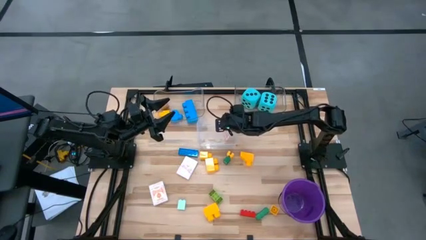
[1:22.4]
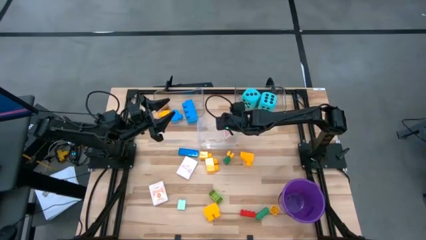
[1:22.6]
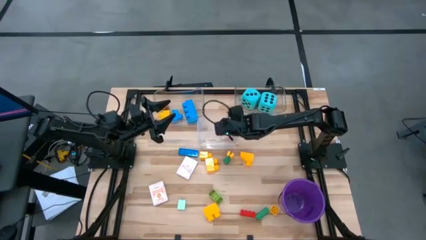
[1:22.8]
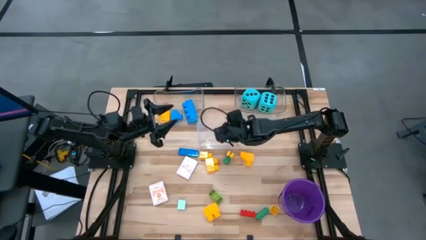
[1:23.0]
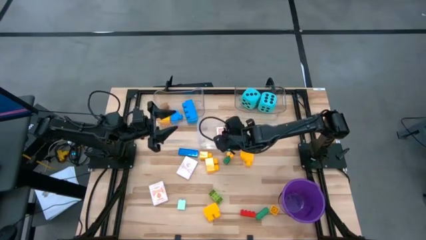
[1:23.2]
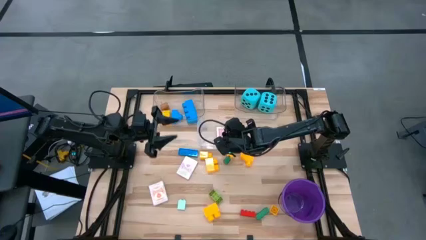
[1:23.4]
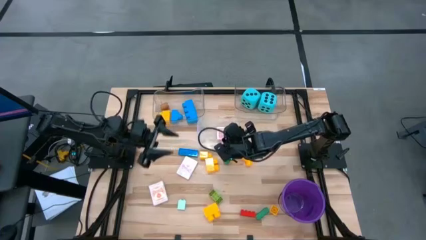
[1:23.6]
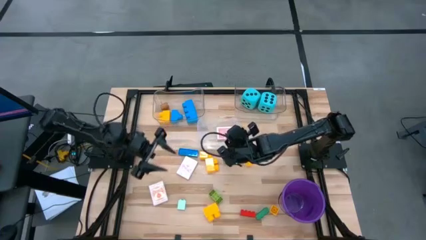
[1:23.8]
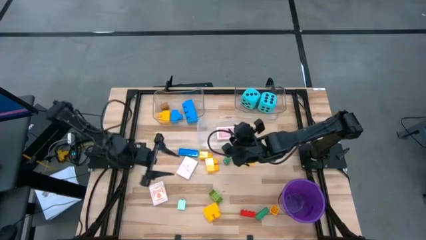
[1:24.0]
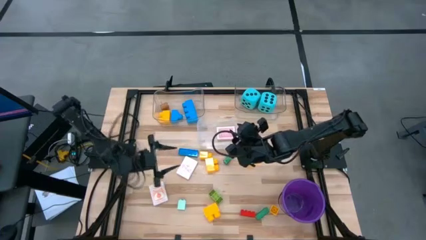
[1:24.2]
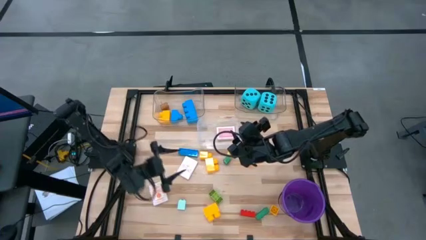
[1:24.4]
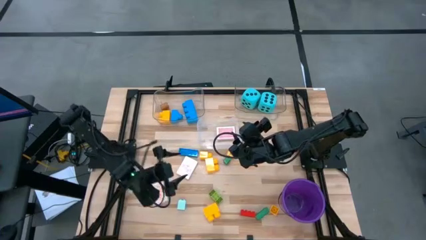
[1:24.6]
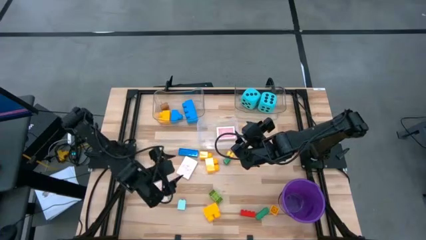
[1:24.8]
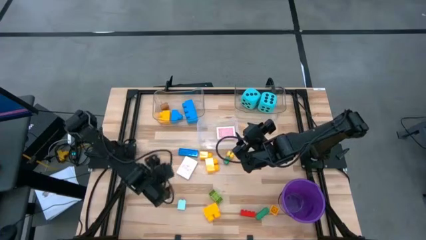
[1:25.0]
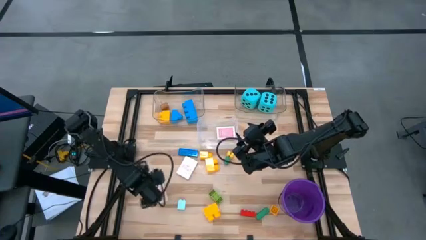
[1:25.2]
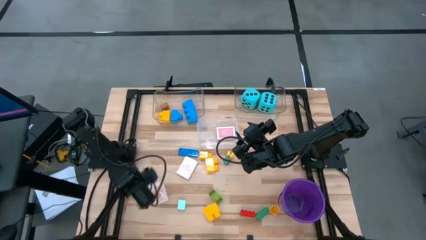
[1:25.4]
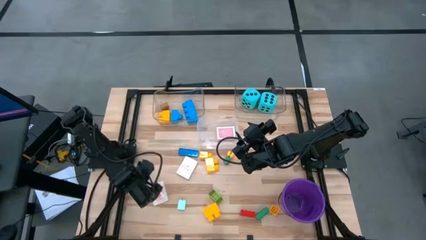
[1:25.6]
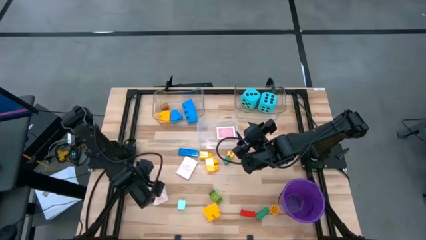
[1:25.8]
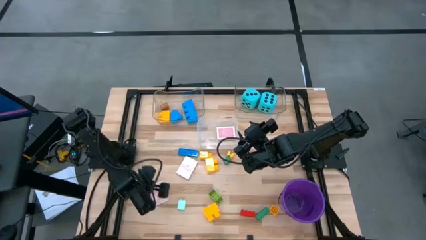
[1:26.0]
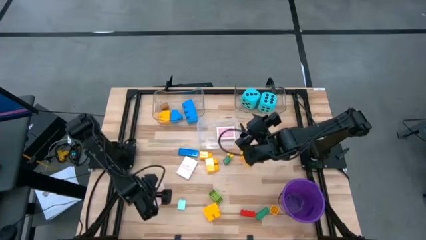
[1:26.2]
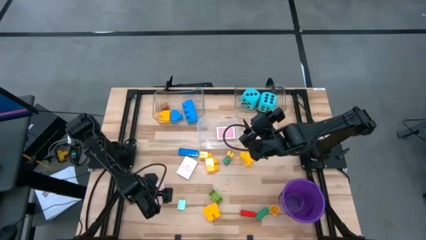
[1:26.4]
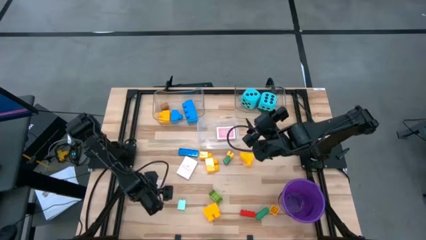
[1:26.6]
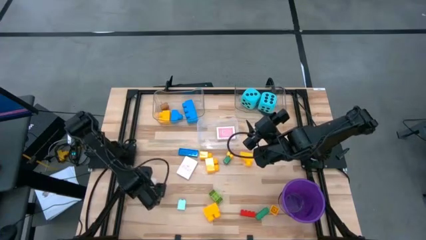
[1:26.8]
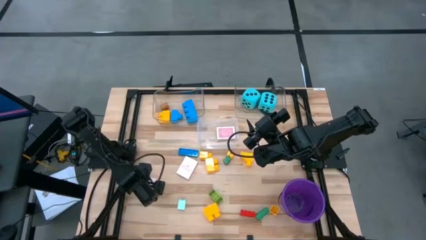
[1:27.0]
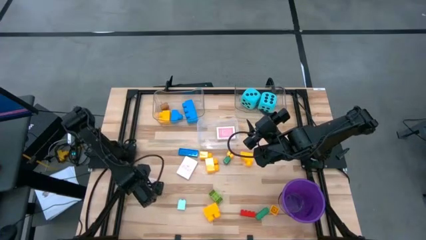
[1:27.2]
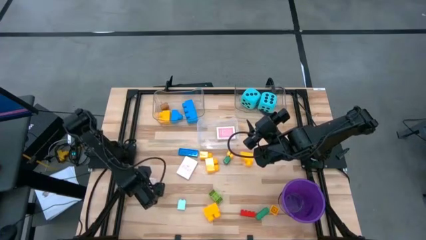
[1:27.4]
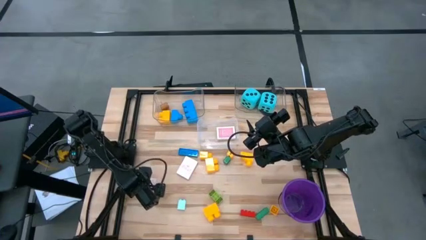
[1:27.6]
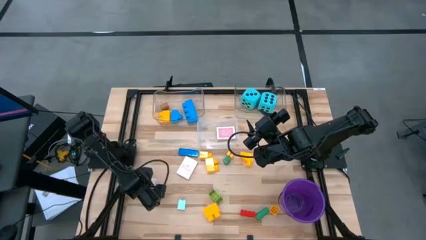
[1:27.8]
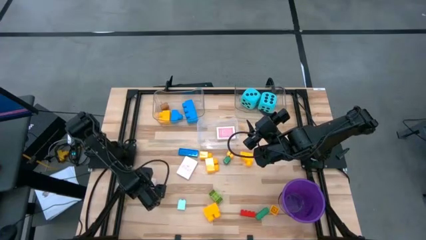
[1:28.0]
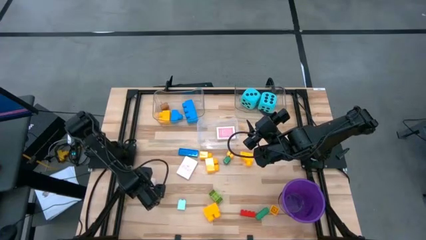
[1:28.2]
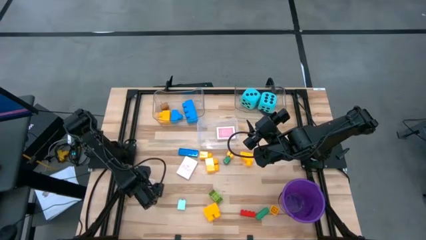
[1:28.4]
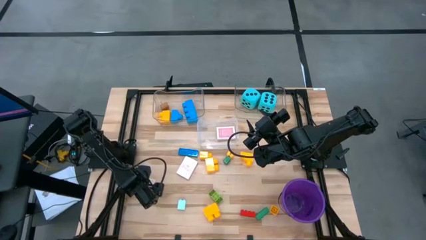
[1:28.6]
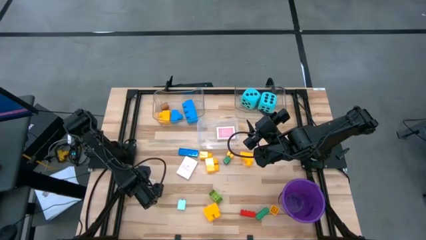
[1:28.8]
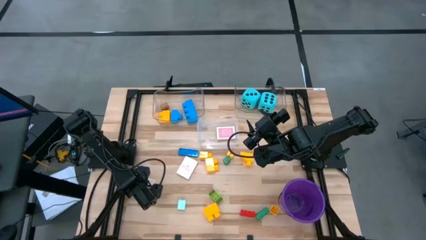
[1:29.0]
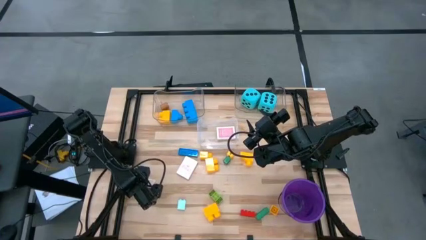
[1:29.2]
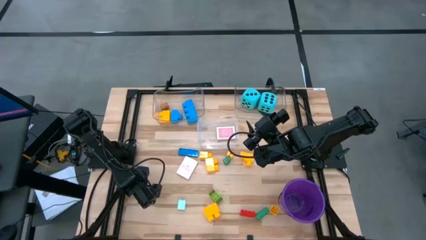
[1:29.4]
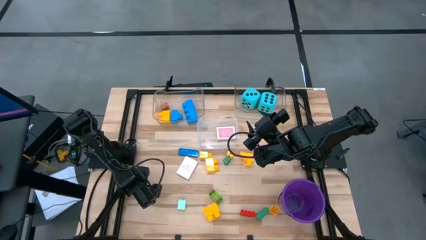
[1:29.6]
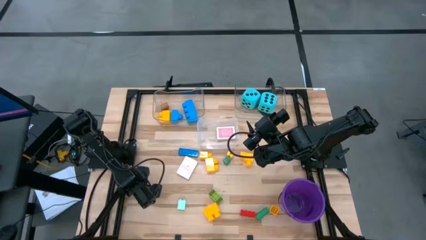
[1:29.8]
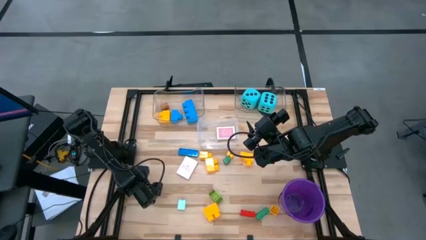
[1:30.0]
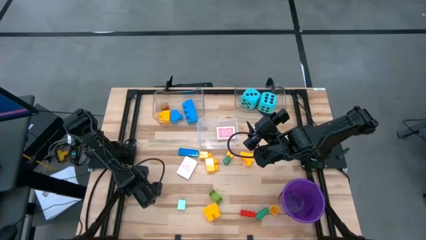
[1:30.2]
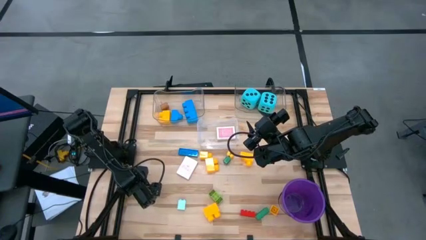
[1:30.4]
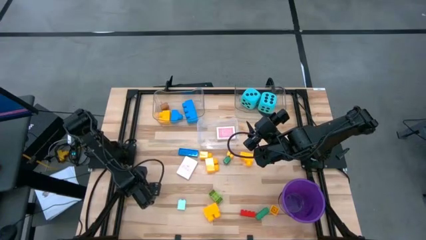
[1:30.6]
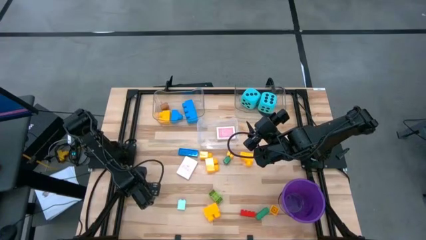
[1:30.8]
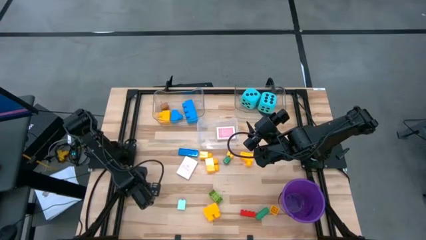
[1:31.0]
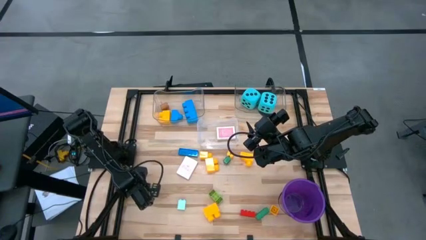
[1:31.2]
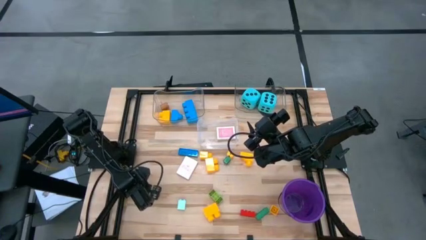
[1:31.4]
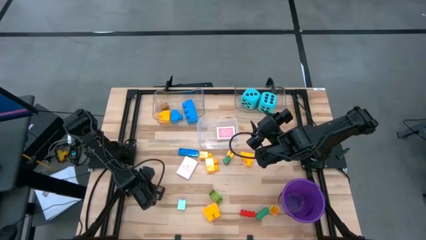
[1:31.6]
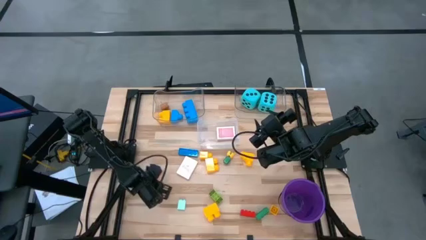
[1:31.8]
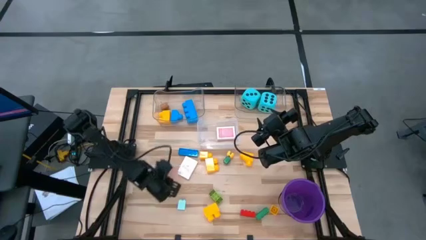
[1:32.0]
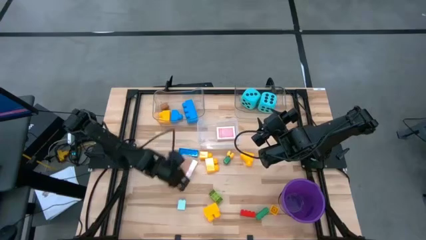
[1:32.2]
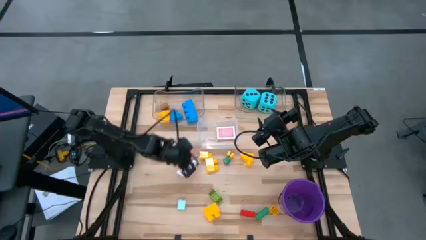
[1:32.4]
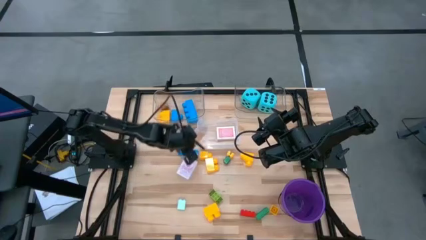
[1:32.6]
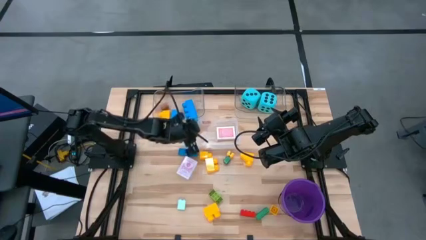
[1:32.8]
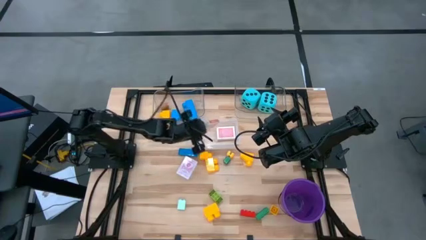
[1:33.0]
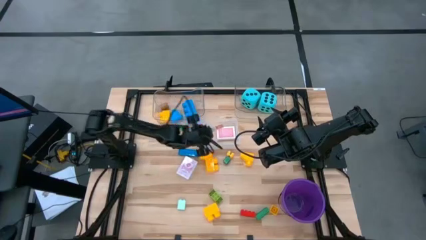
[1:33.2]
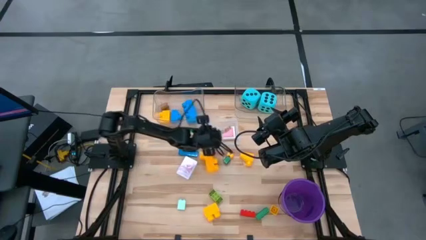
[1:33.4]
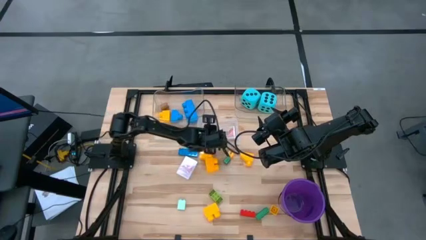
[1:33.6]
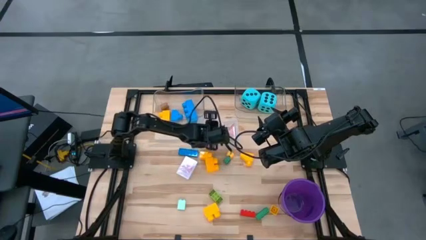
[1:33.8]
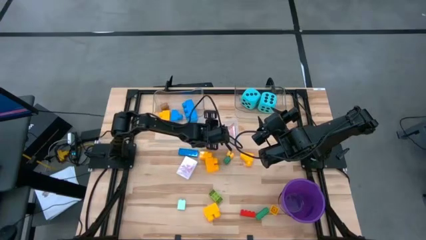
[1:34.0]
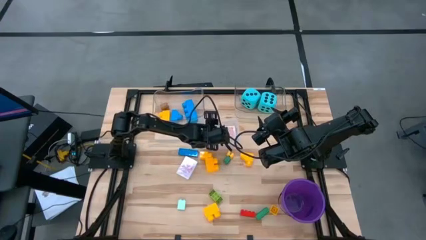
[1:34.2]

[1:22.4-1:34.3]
Task: Pick & Place Toys
Put the orange deck of cards into the bottom transparent bin

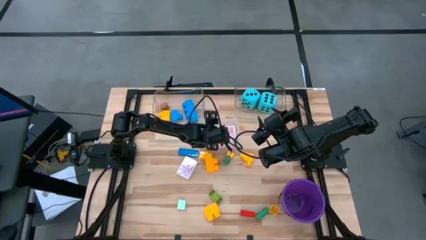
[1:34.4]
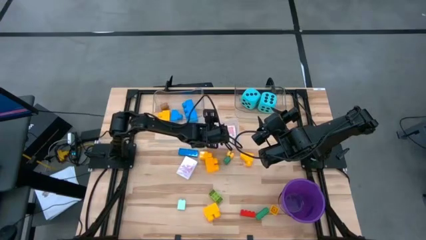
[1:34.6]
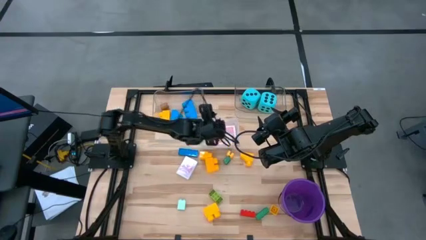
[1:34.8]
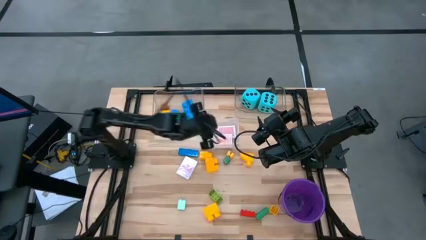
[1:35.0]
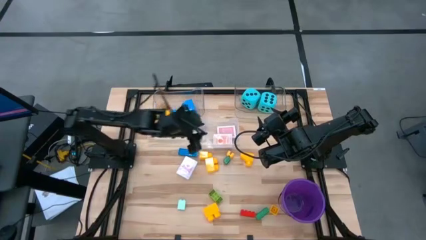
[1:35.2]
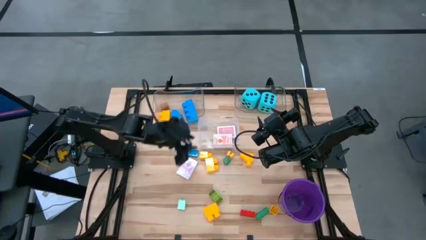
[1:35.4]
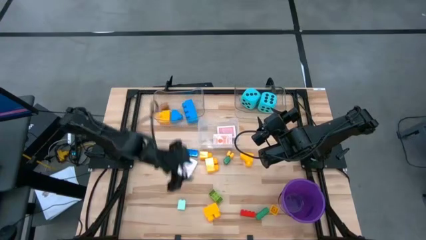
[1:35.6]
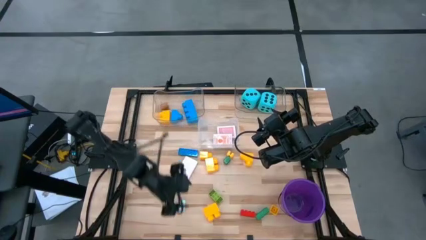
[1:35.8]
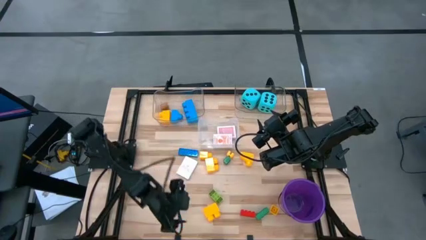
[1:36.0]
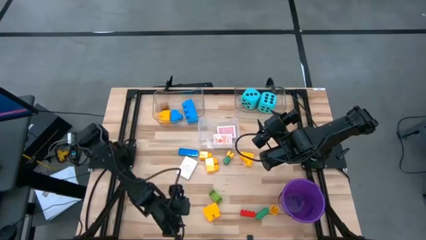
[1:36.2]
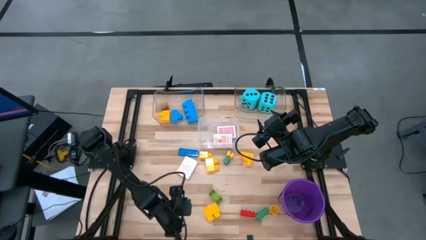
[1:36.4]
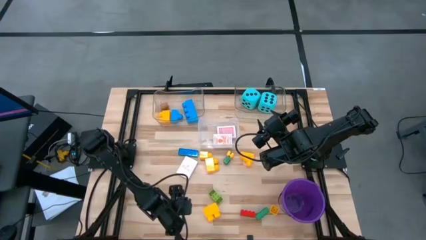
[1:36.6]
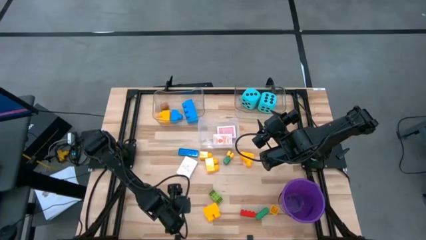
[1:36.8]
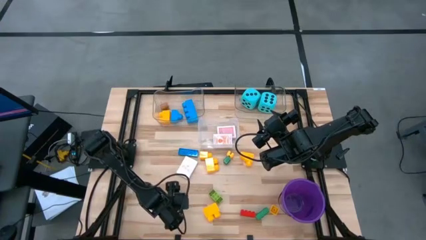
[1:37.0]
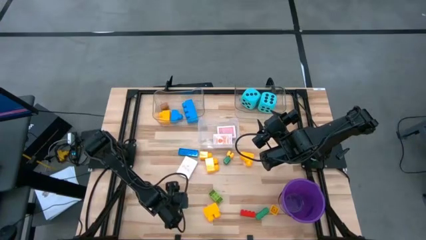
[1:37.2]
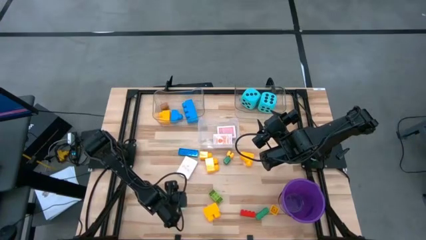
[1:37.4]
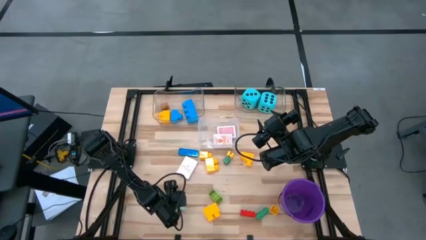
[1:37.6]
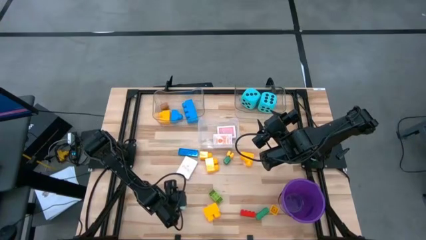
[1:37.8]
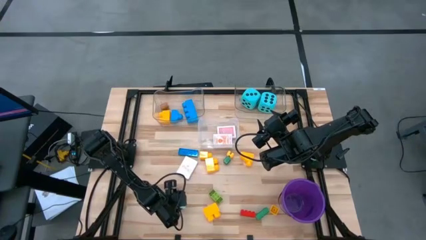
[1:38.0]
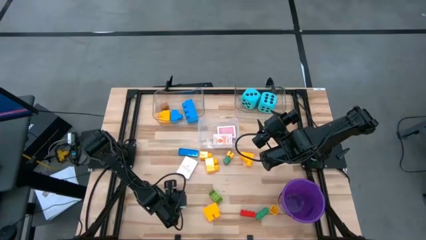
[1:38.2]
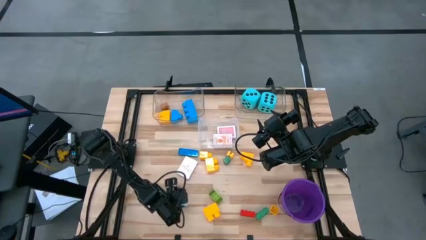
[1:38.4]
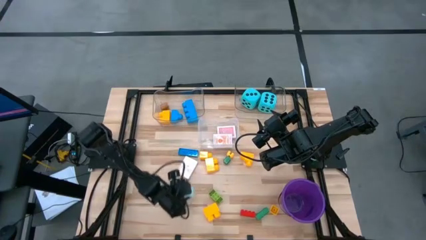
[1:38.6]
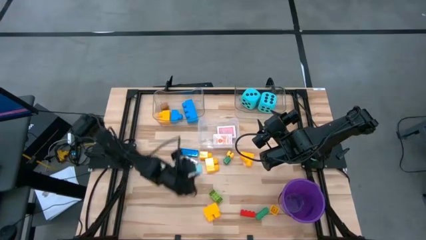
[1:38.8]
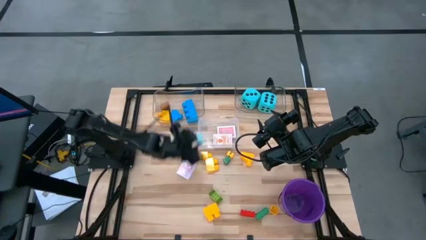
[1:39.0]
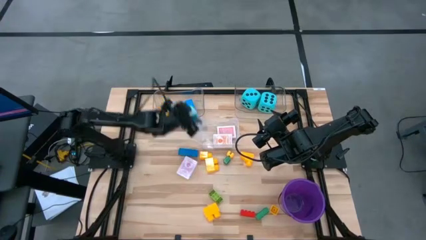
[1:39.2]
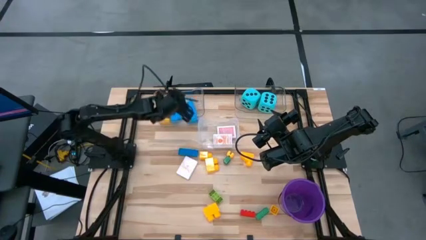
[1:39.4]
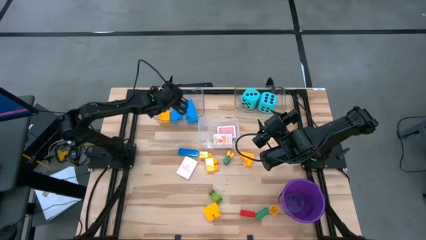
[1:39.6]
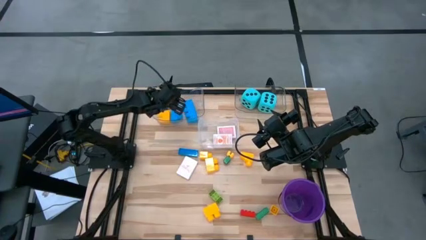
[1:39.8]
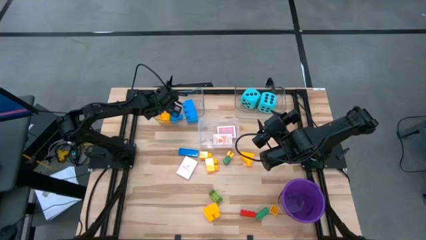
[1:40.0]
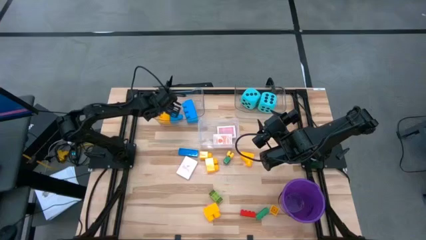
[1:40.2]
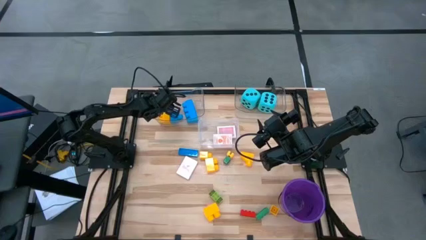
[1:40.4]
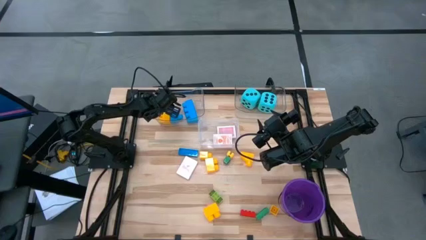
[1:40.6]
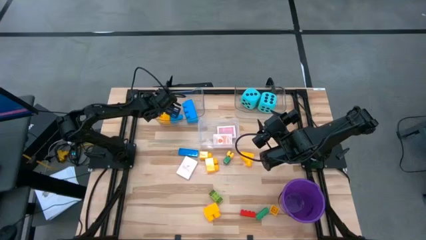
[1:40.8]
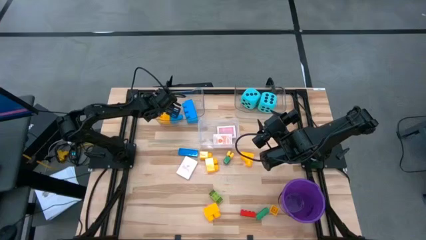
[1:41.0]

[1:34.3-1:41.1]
Put the light blue game piece into the top left transparent bin
